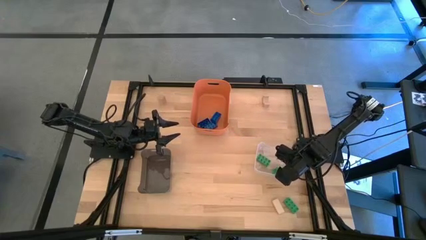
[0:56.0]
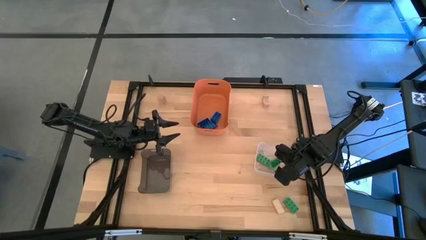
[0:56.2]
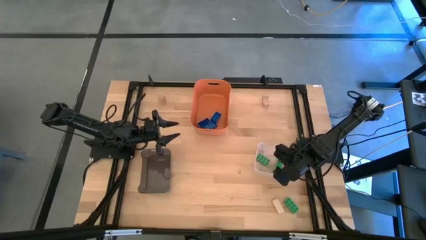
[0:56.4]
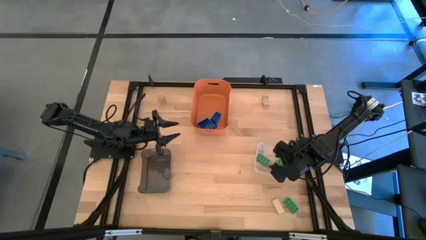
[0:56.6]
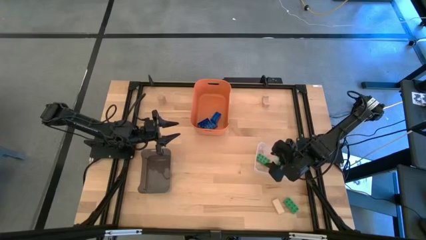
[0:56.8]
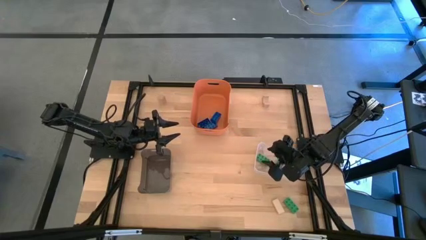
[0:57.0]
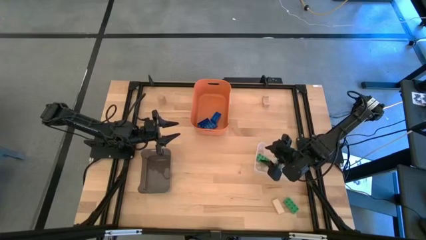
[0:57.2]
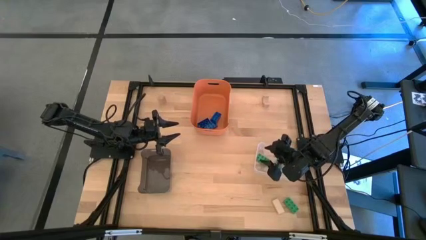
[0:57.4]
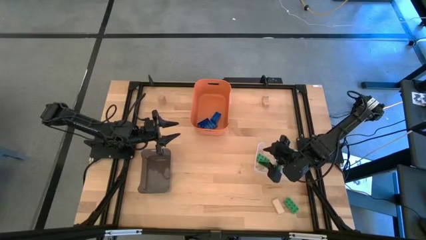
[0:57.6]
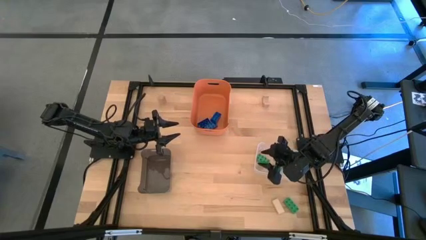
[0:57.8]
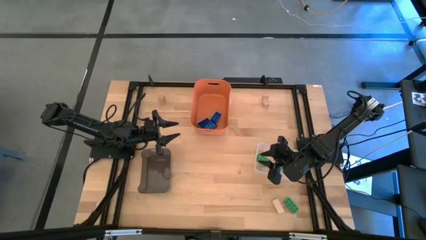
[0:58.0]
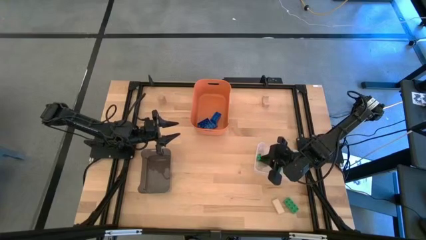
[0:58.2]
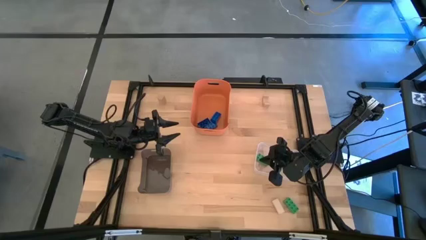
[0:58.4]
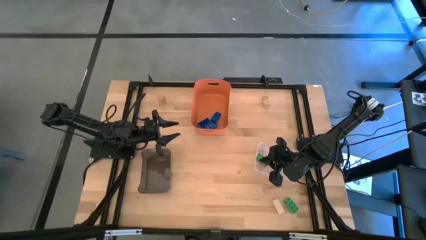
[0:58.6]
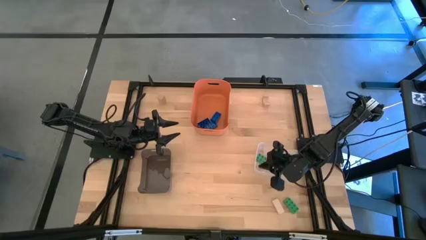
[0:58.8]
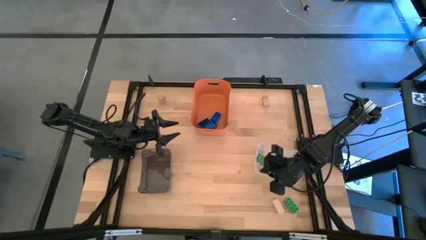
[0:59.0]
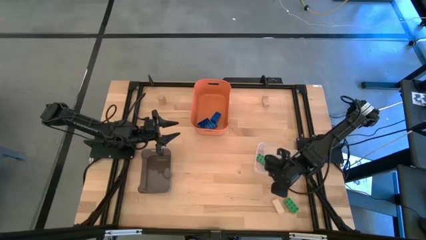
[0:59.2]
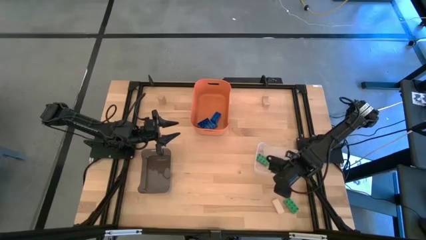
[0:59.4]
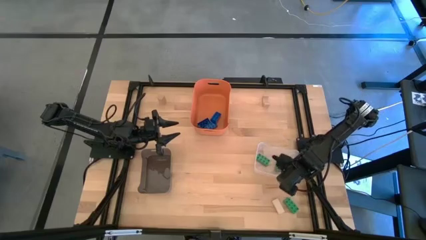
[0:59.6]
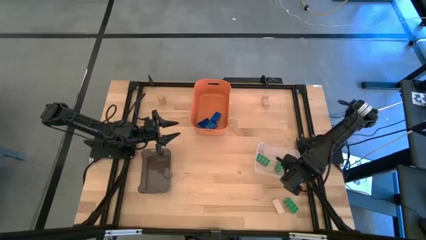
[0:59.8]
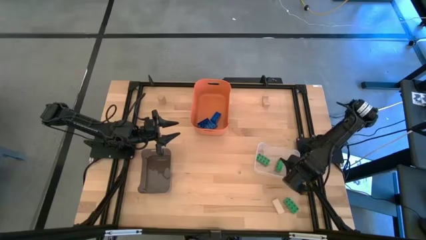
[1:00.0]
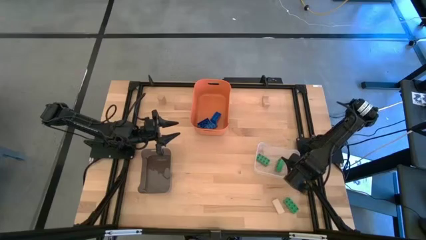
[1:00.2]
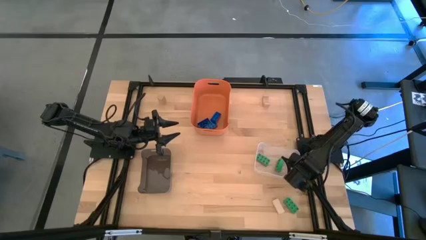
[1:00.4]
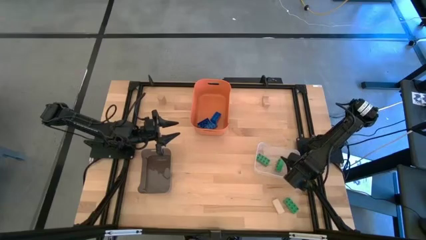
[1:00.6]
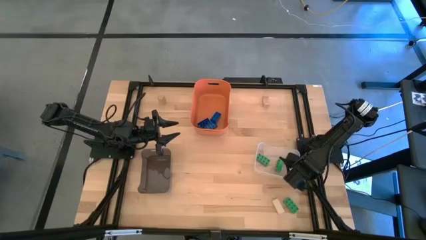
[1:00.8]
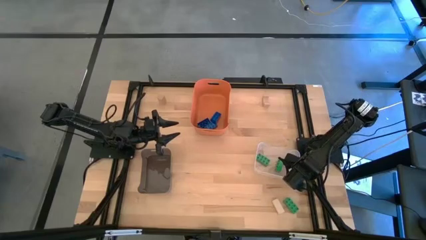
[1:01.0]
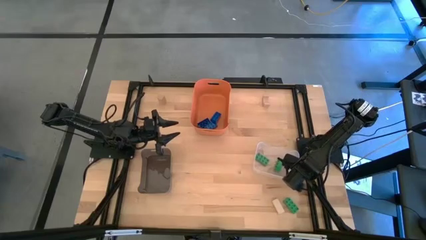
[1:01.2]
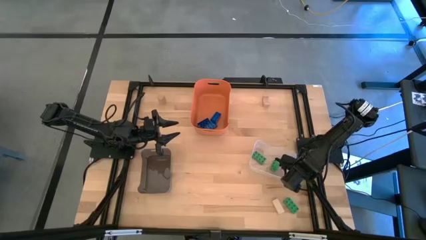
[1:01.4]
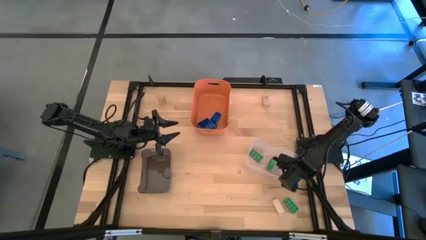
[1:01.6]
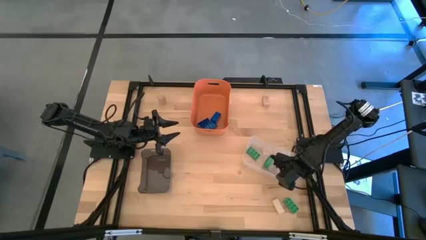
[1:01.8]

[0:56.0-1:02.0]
Task: Sort & place blocks by color
Adjust the transparent bin on the table

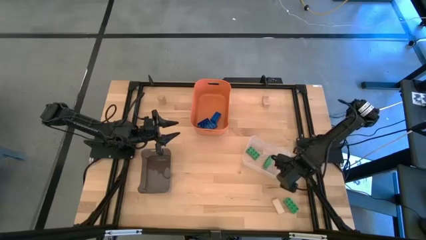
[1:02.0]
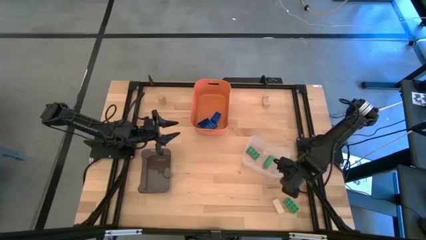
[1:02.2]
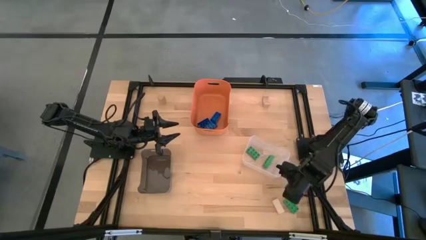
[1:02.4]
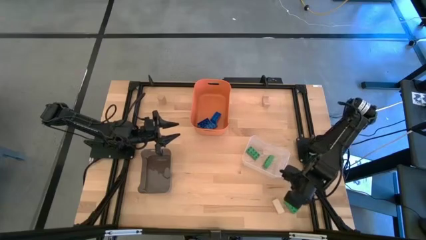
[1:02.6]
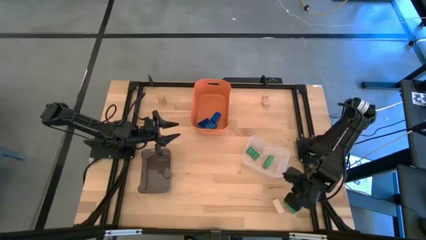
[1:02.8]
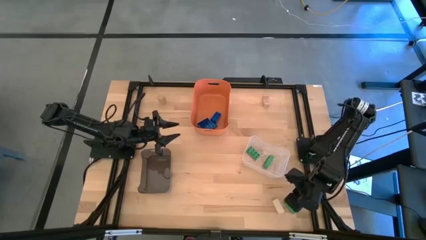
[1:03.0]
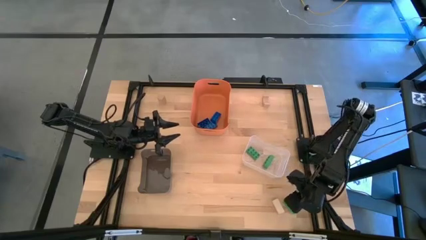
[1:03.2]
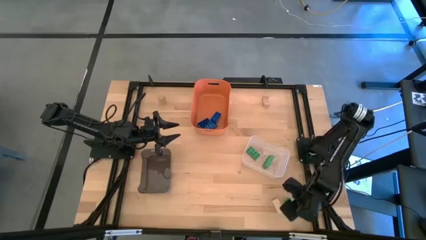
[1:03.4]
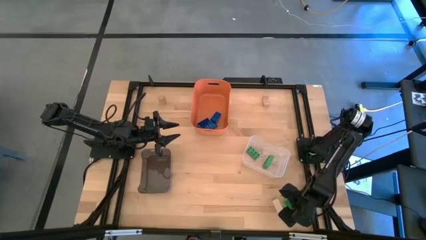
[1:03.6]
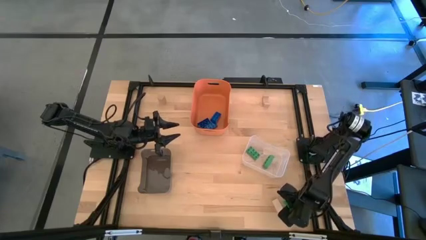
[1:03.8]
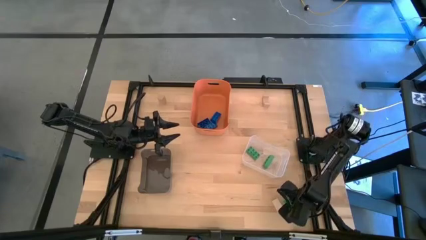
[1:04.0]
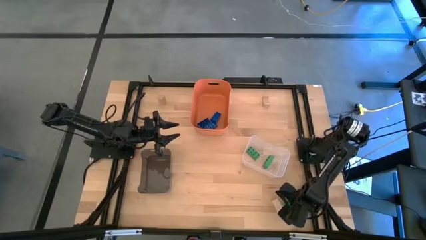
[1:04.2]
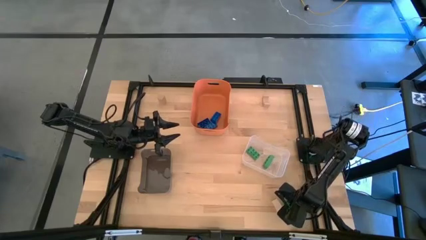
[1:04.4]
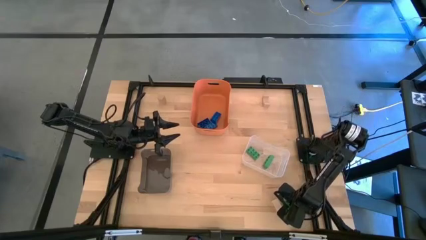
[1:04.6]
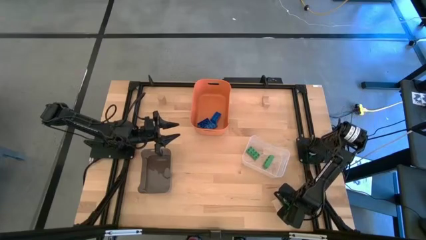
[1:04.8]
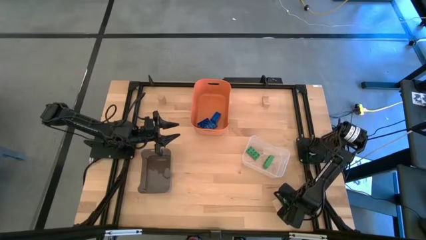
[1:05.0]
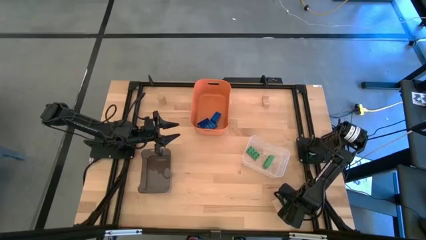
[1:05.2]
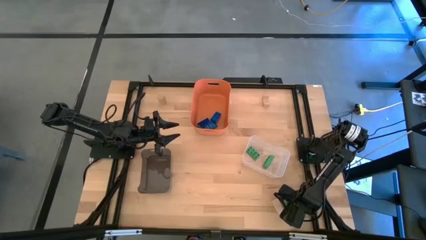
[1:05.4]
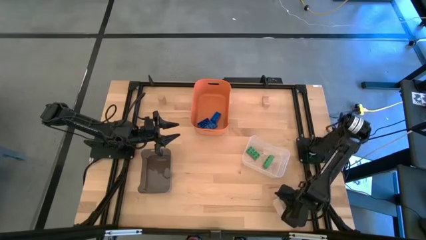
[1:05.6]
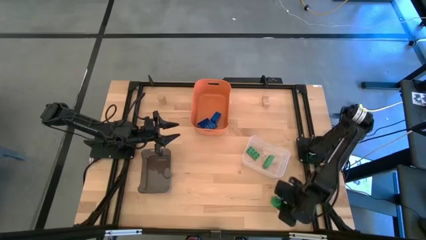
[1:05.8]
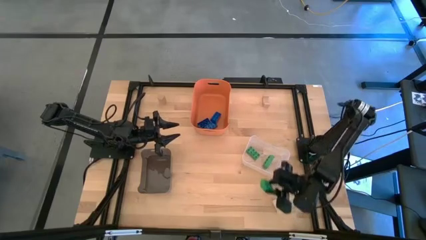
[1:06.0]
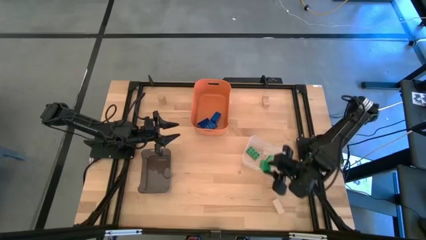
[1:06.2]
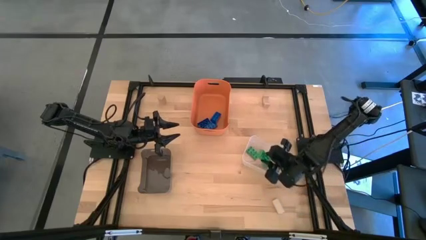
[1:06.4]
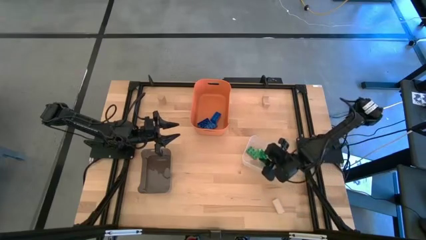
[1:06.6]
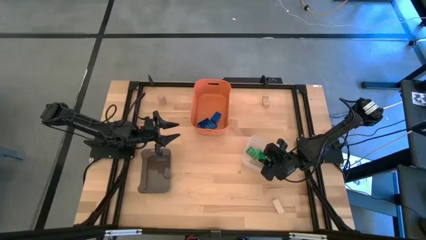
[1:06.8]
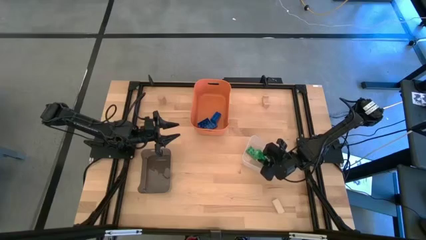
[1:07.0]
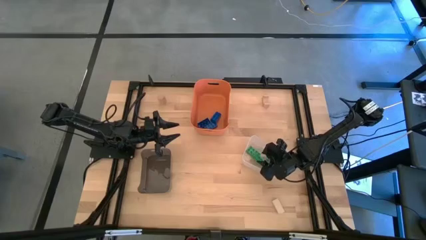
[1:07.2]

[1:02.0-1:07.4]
Put the green game piece into the transparent bin

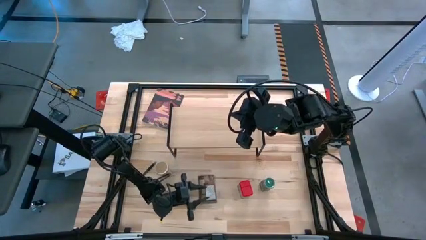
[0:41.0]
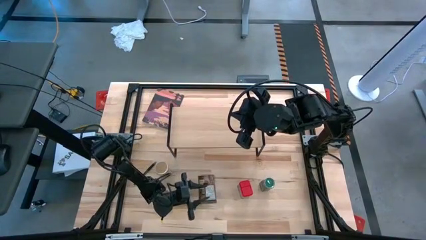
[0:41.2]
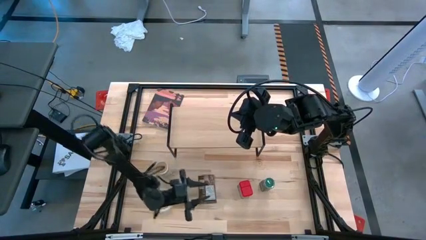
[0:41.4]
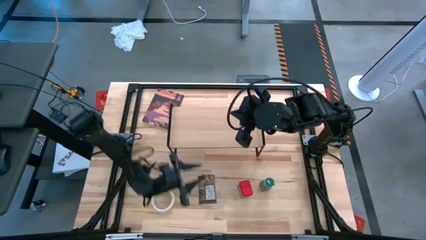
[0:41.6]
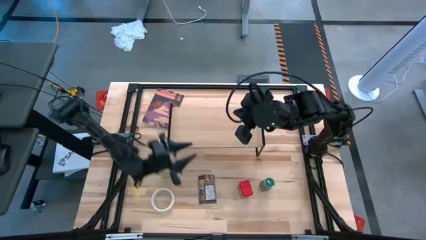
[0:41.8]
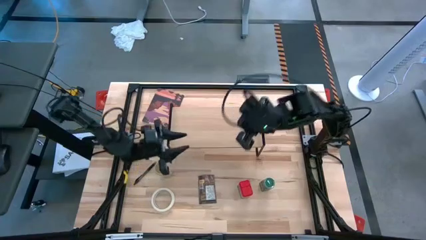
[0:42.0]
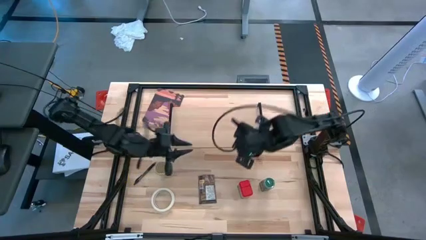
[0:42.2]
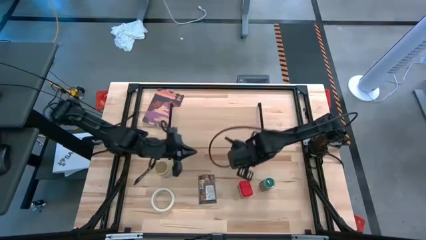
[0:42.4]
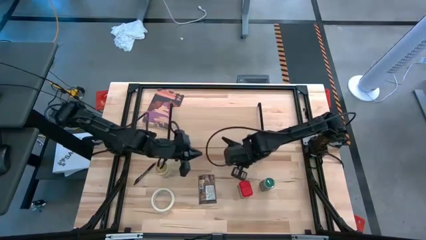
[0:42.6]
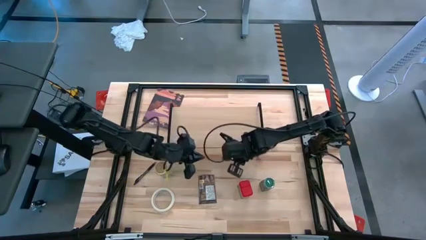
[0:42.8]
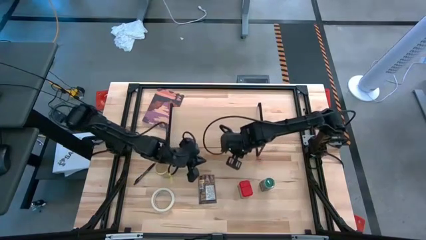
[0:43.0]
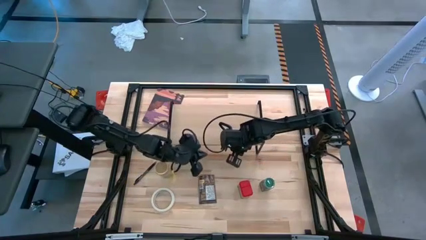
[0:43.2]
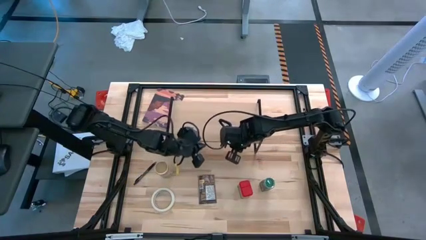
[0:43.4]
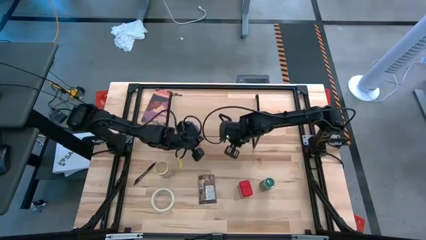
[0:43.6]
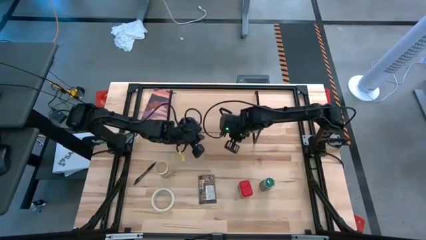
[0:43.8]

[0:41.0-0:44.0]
Task: Shelf spices
Adjust the shelf
